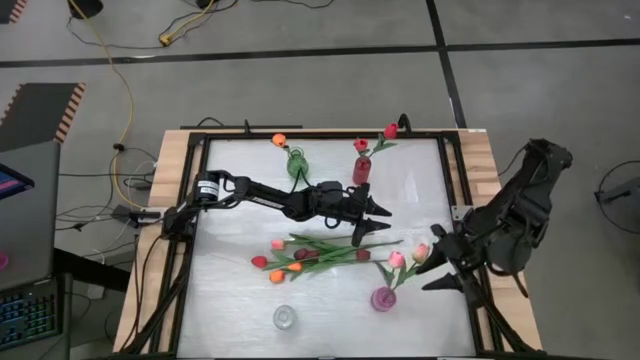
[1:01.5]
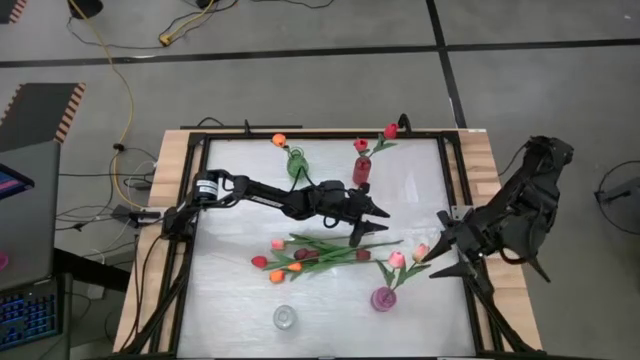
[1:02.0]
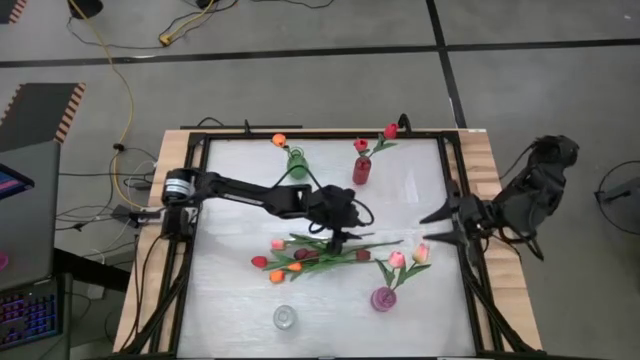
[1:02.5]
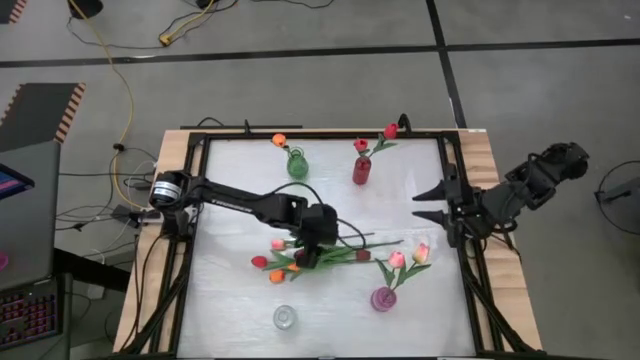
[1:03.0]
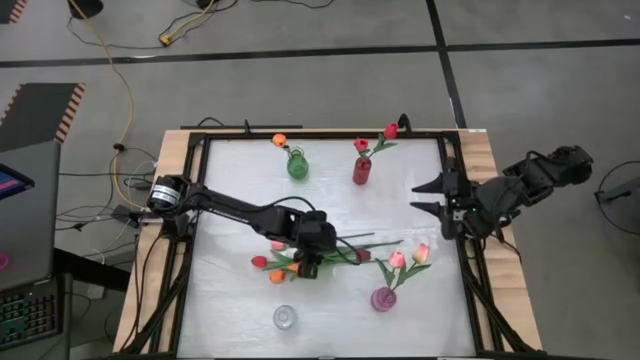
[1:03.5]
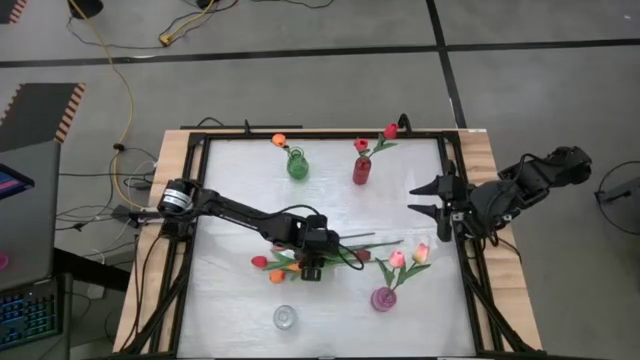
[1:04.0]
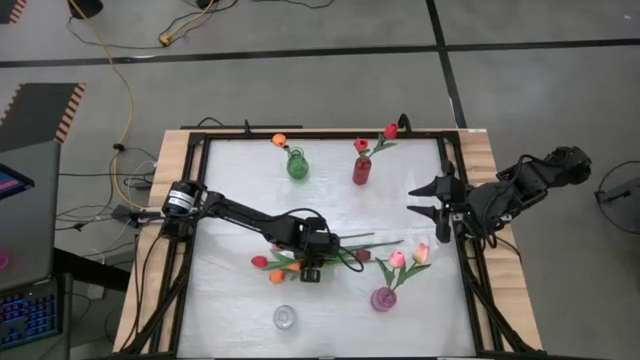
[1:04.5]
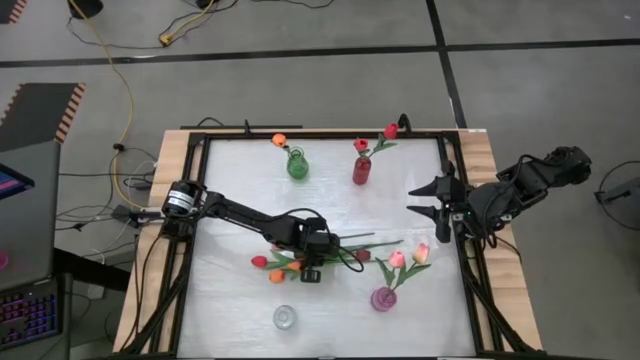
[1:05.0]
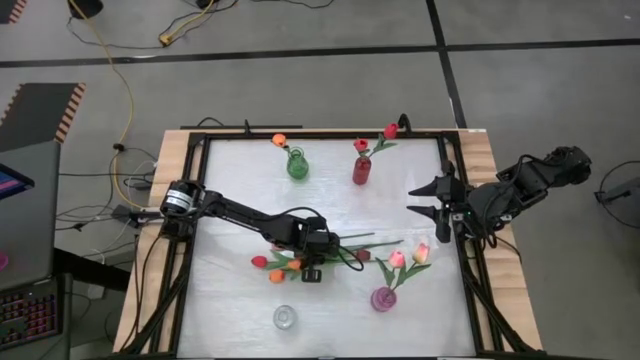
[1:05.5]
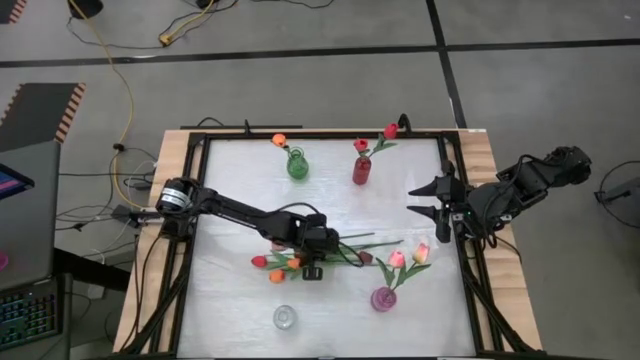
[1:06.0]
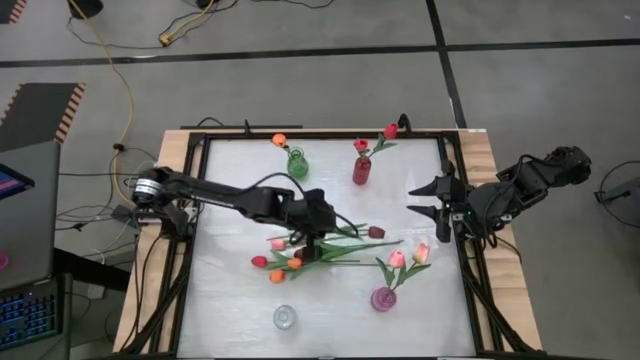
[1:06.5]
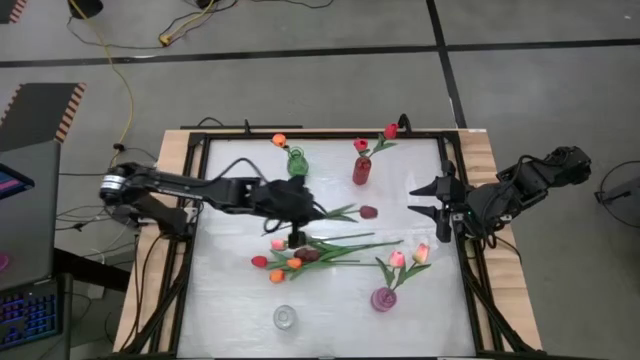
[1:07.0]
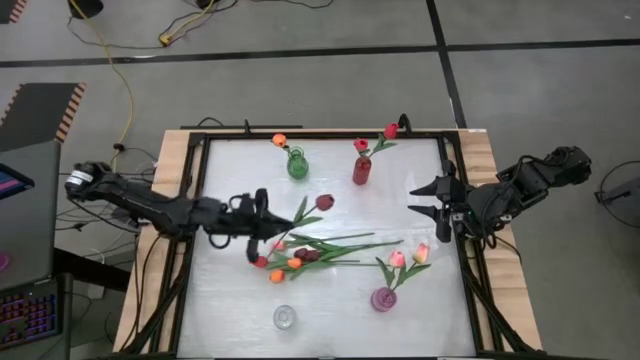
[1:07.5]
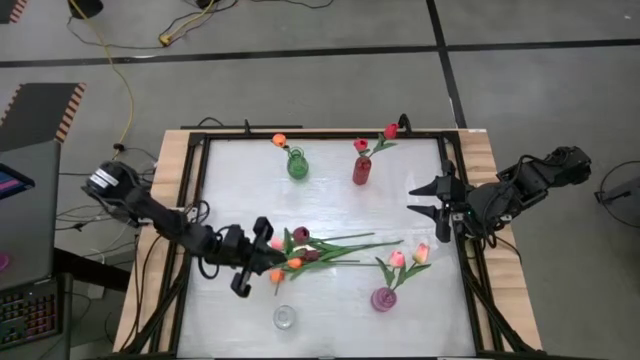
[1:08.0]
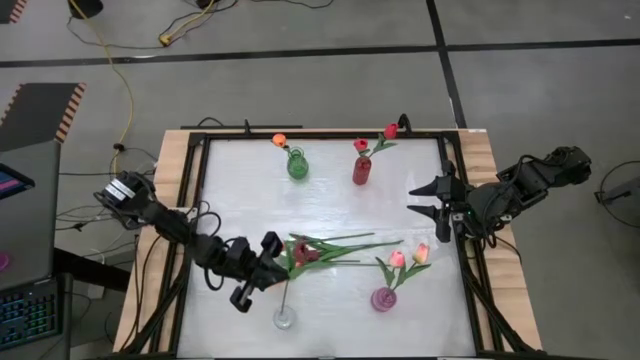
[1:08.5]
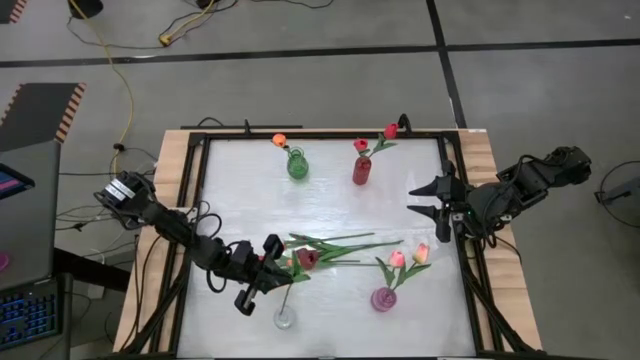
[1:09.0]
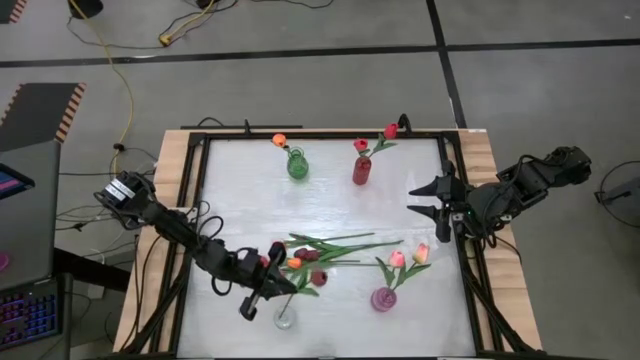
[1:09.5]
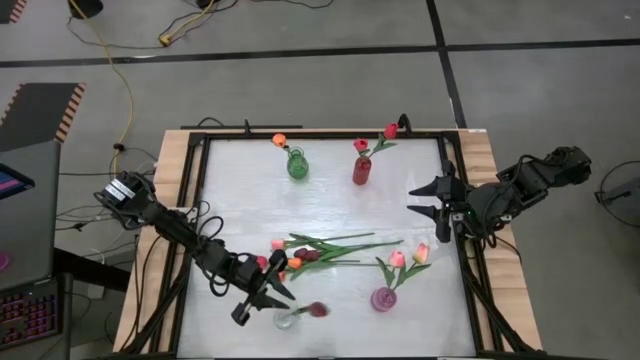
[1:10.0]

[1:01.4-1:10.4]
Task: Sort flowers into vase by color
Put the dark red flower into the transparent vase

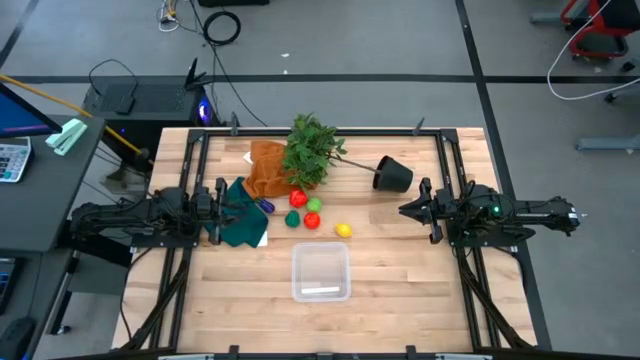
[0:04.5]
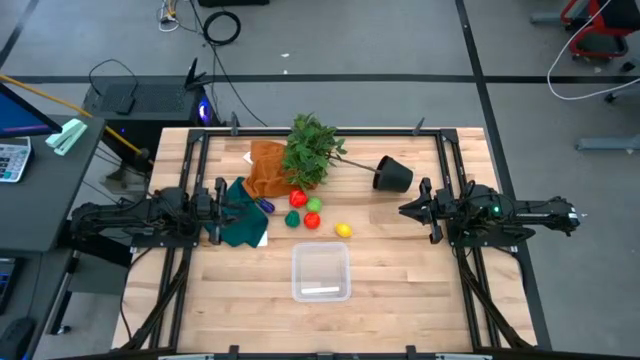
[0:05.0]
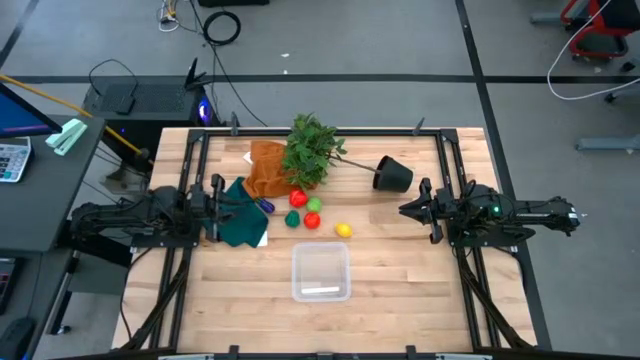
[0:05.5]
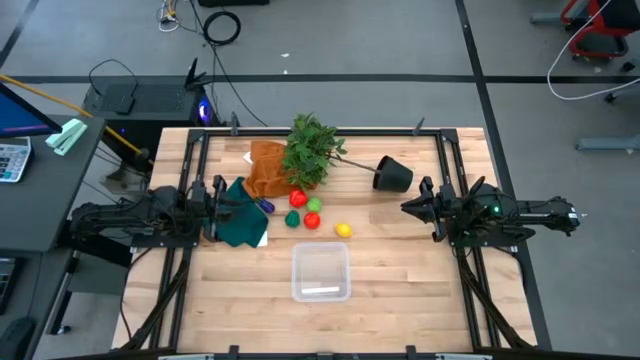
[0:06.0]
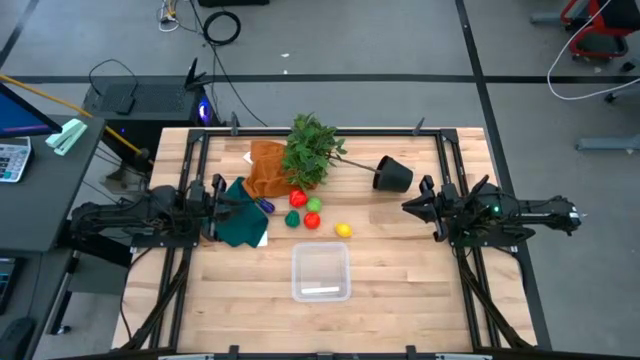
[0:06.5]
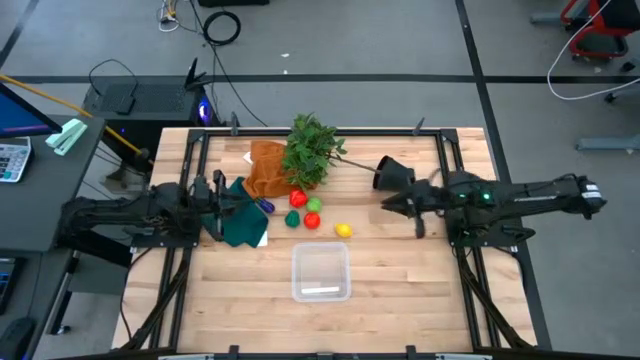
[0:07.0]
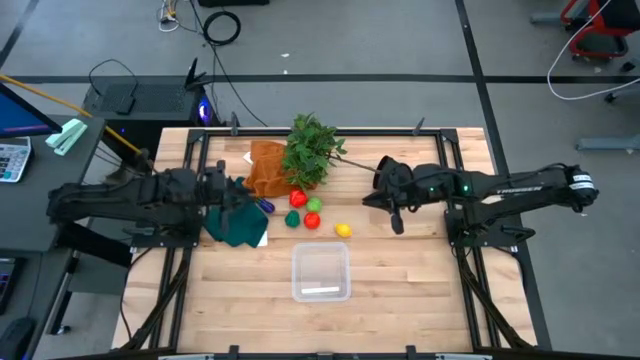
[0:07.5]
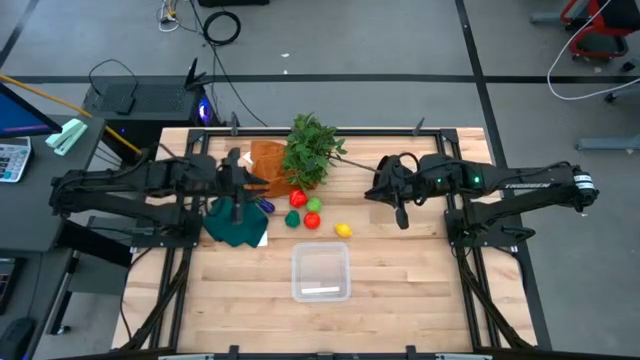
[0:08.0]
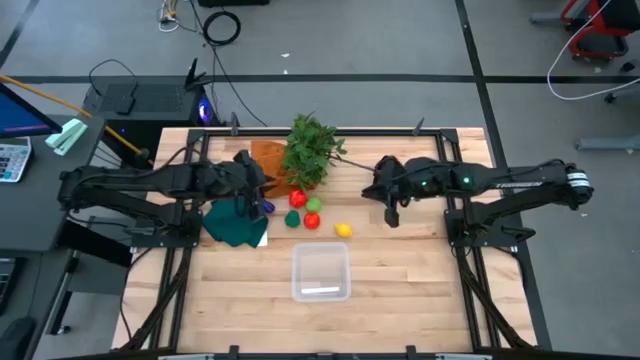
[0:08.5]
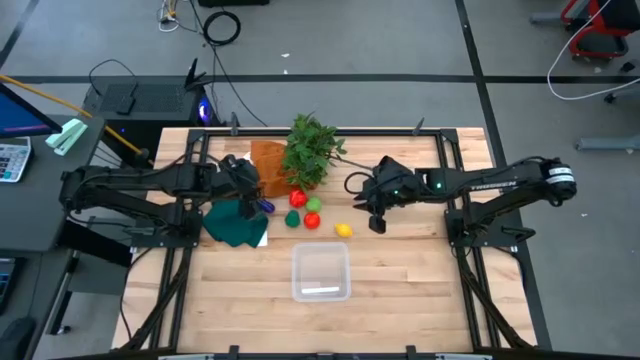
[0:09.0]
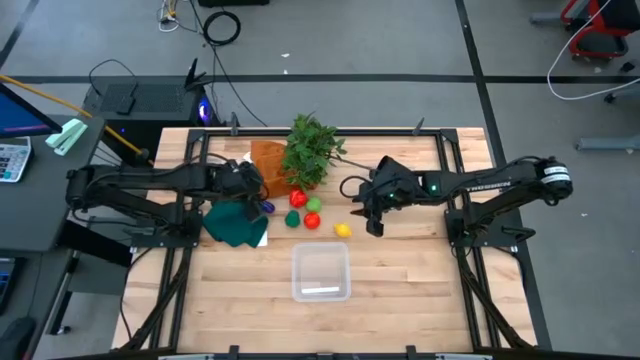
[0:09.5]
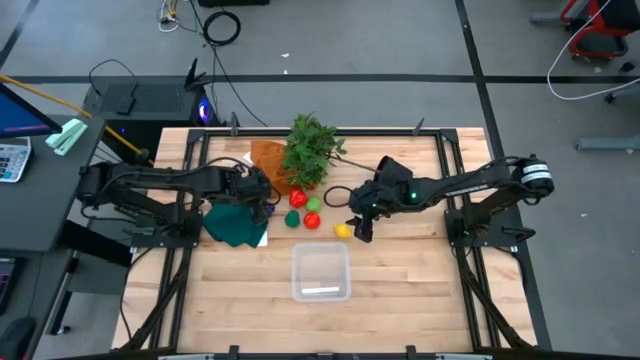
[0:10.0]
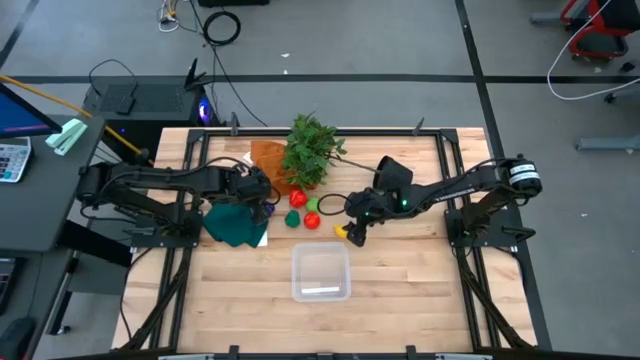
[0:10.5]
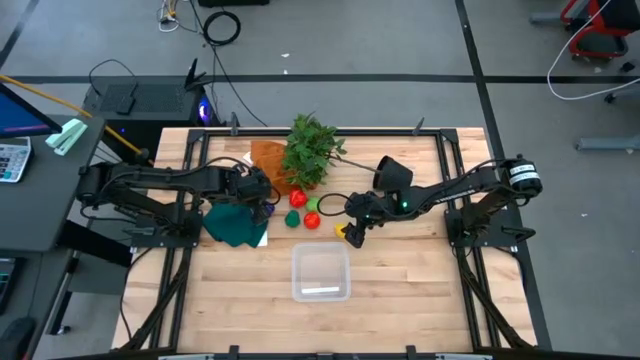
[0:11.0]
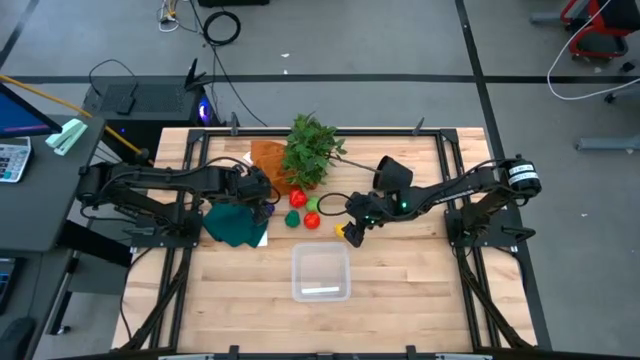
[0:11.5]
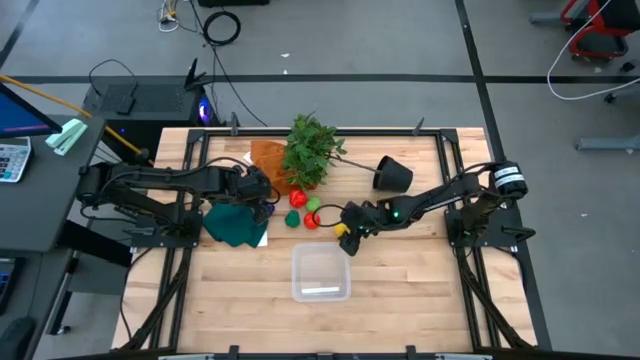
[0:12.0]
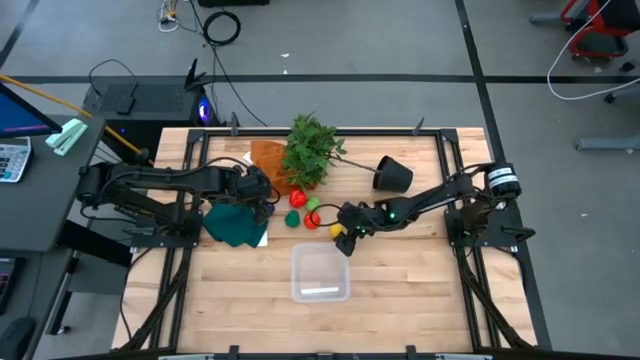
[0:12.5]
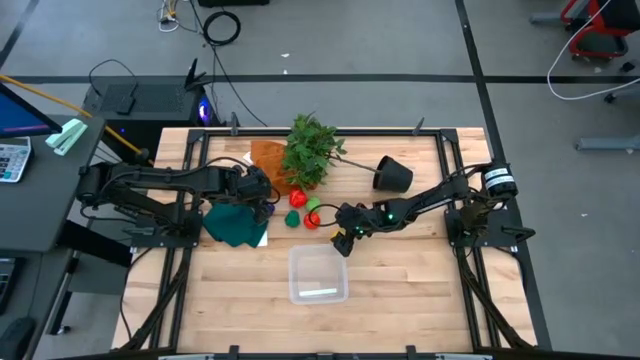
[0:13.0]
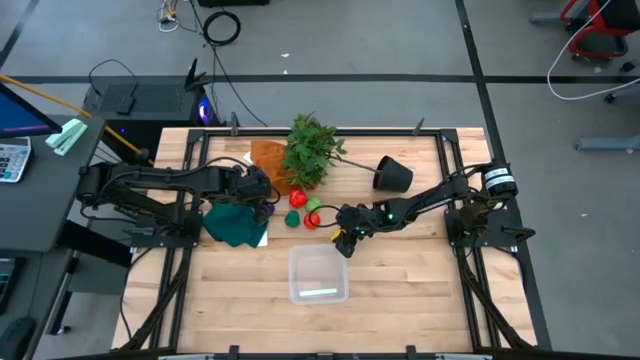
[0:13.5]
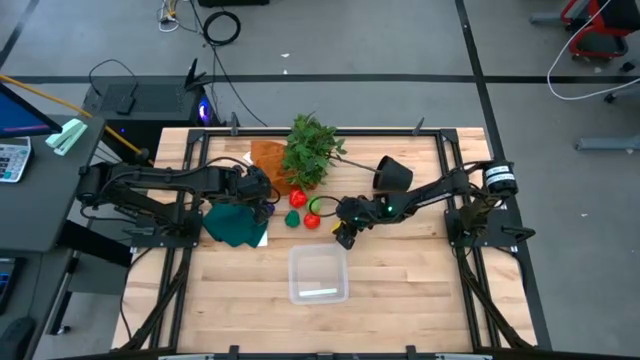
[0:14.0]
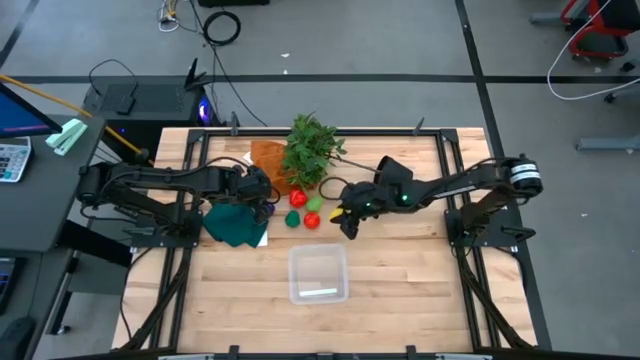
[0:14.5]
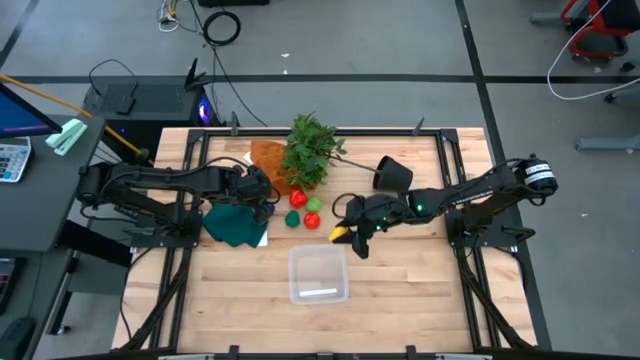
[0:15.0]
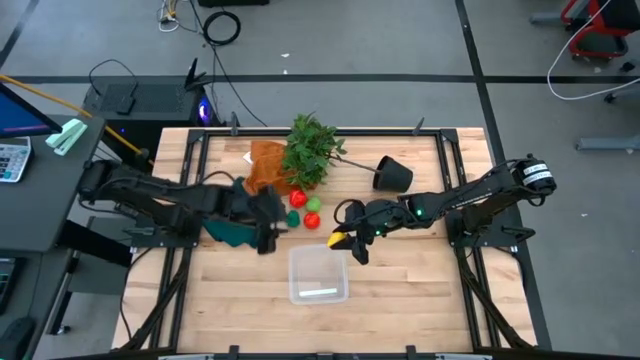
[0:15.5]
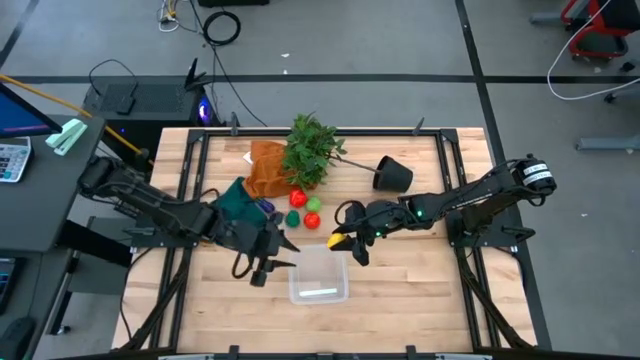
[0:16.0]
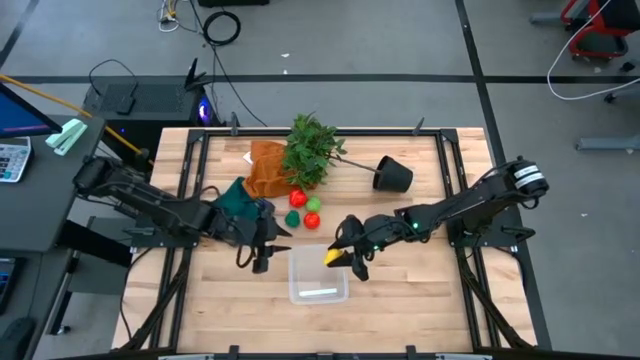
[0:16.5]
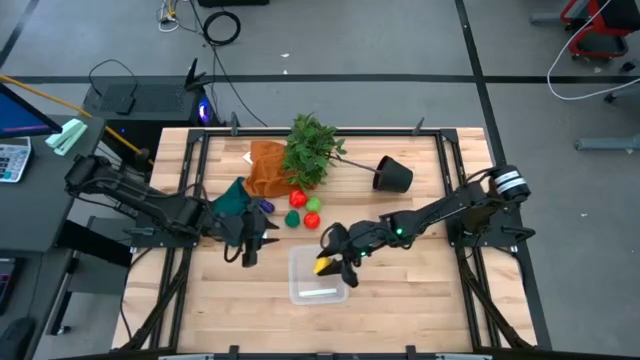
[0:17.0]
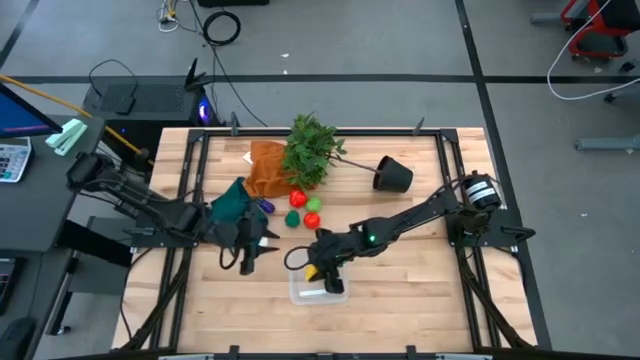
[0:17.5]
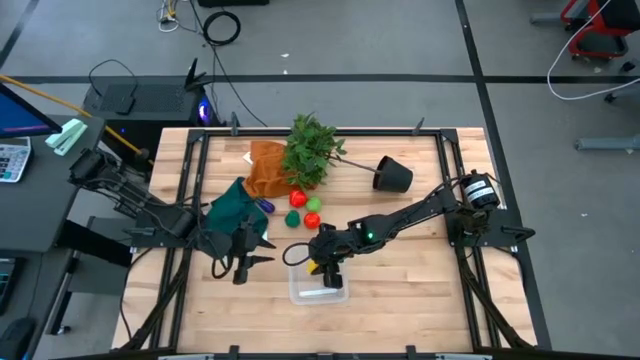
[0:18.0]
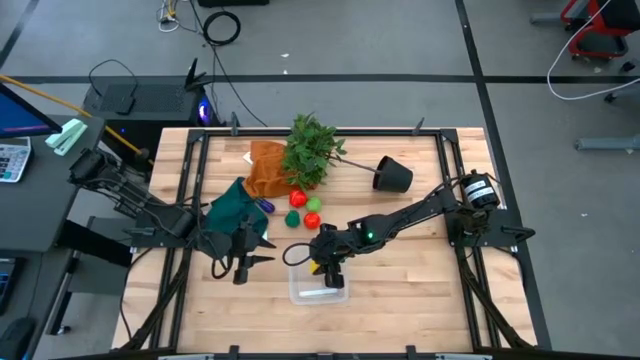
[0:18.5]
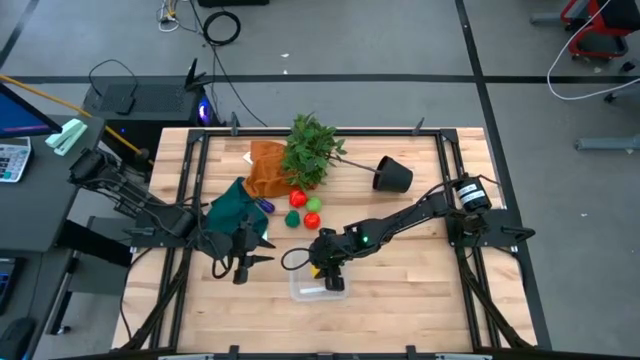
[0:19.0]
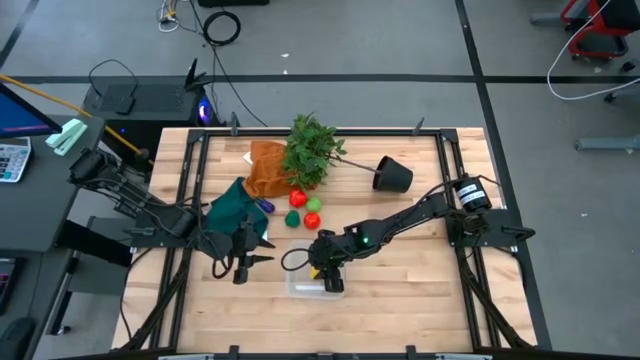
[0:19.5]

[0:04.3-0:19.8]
Task: Pick and placing Produce into tupperware
Put the yellow lemon into the transparent bin
